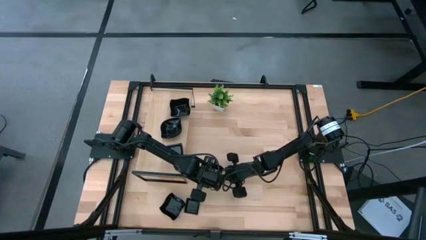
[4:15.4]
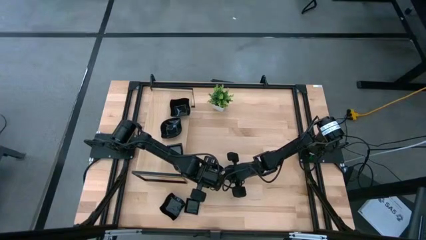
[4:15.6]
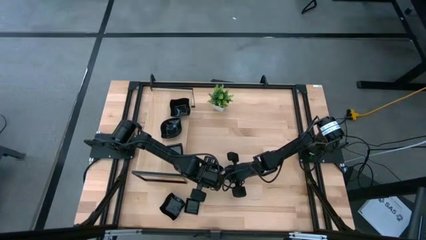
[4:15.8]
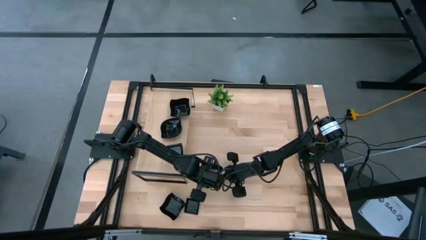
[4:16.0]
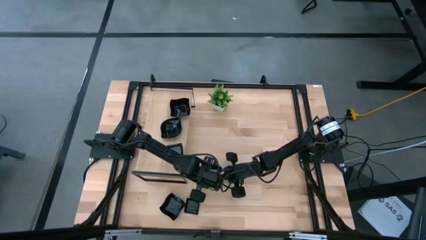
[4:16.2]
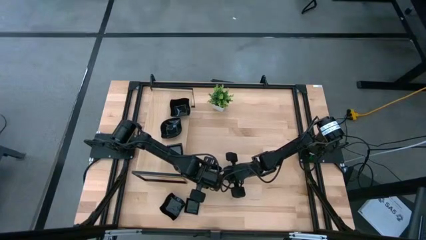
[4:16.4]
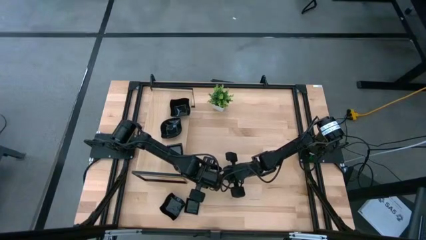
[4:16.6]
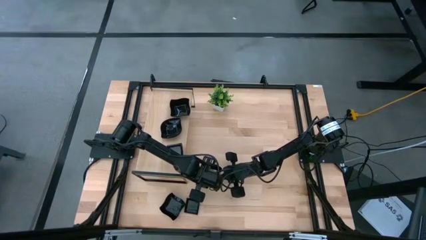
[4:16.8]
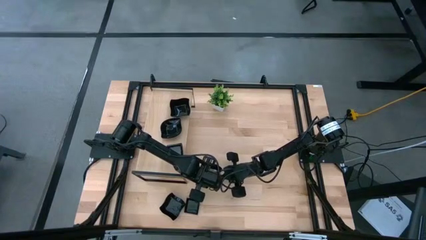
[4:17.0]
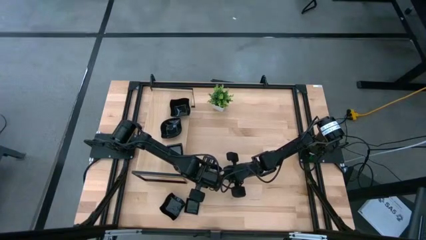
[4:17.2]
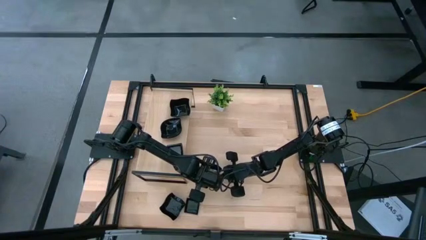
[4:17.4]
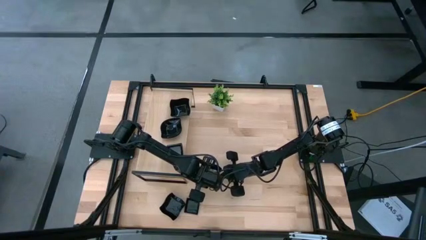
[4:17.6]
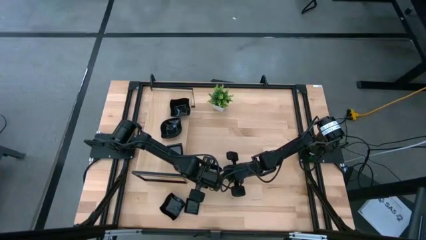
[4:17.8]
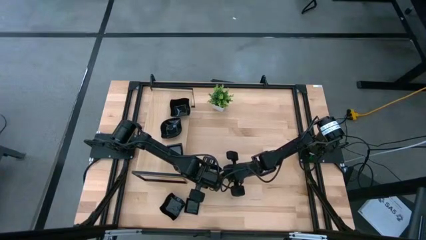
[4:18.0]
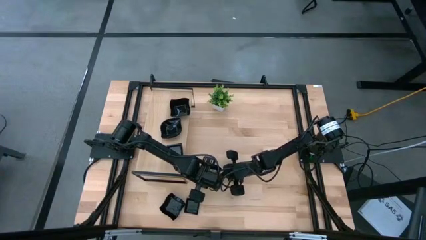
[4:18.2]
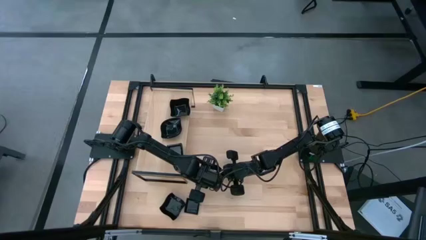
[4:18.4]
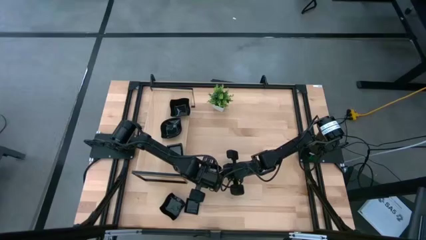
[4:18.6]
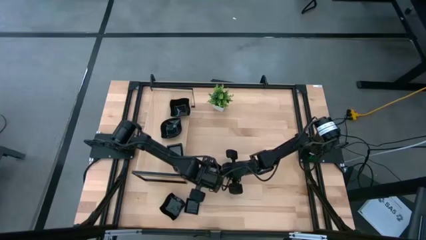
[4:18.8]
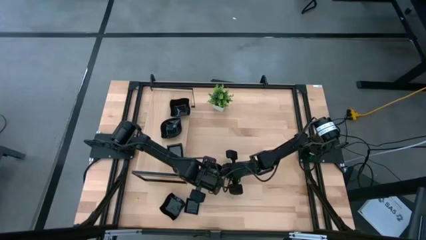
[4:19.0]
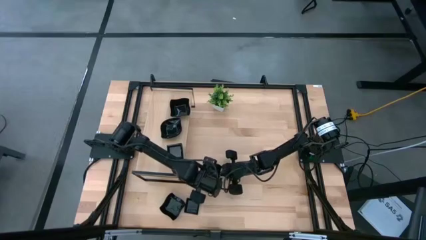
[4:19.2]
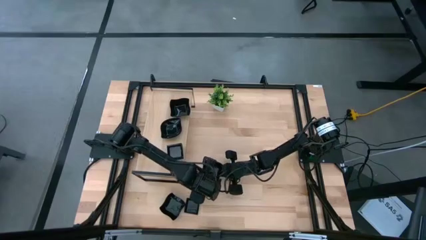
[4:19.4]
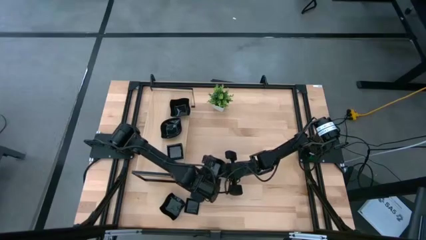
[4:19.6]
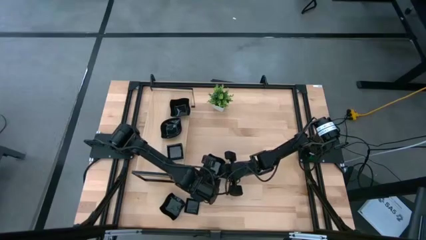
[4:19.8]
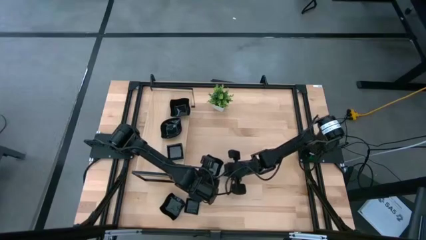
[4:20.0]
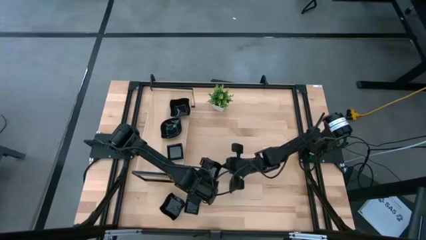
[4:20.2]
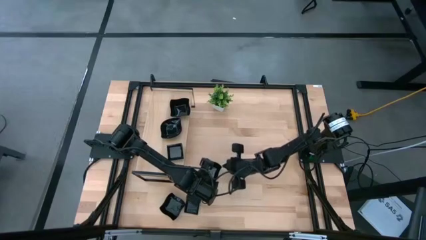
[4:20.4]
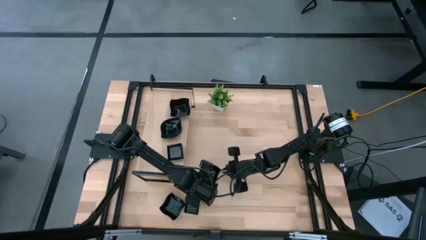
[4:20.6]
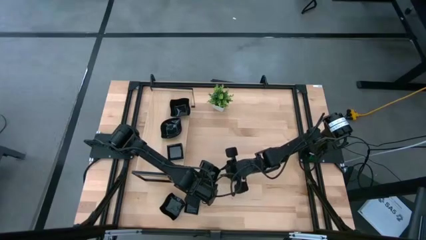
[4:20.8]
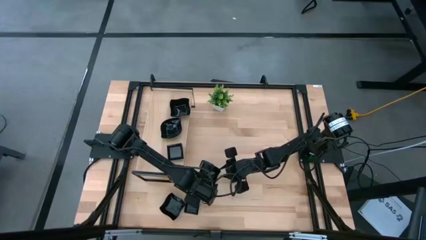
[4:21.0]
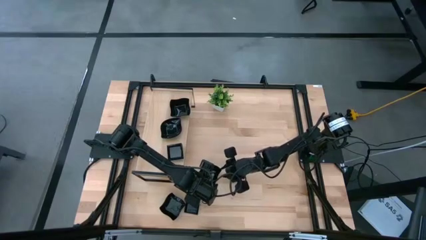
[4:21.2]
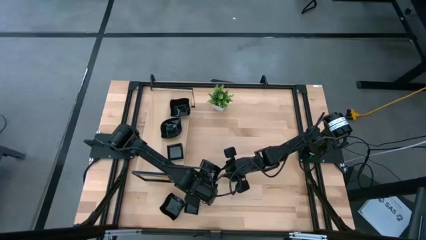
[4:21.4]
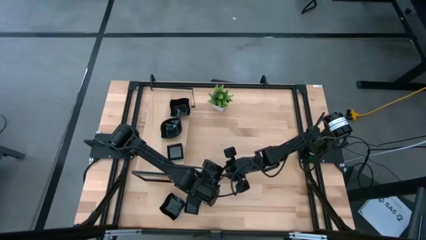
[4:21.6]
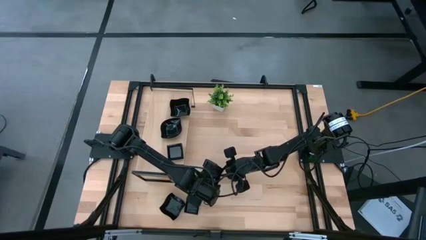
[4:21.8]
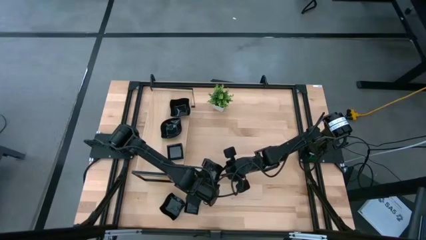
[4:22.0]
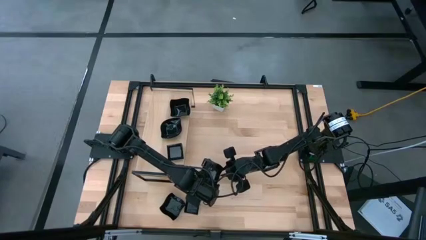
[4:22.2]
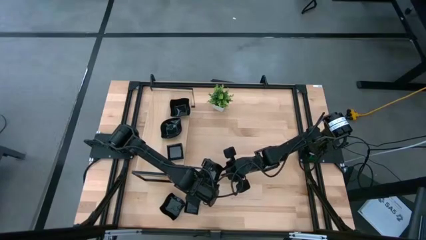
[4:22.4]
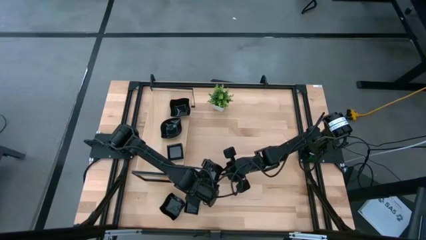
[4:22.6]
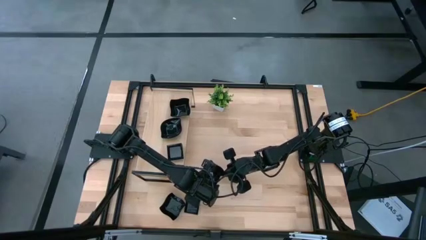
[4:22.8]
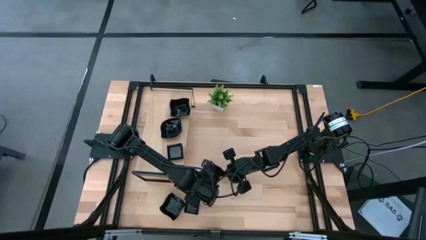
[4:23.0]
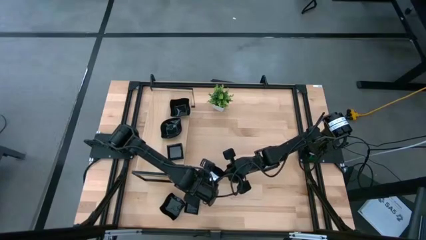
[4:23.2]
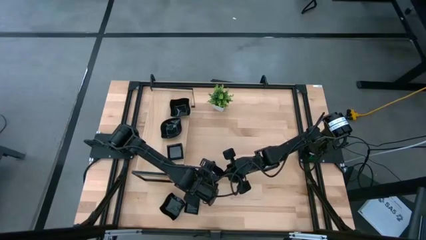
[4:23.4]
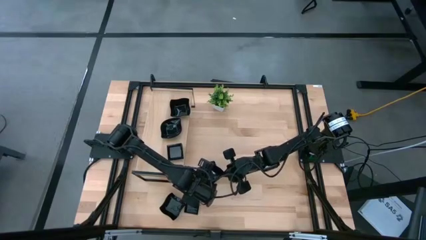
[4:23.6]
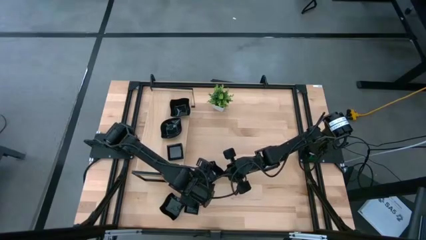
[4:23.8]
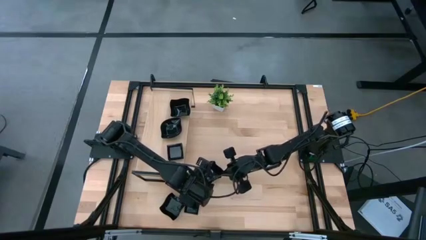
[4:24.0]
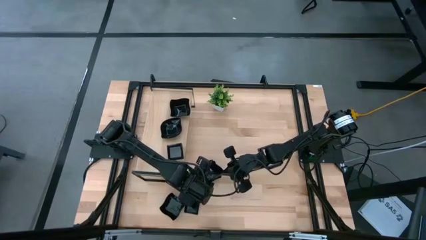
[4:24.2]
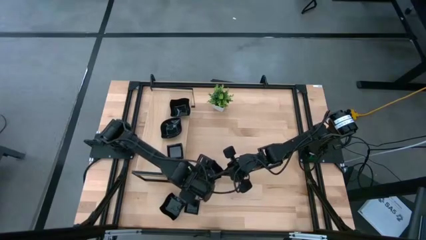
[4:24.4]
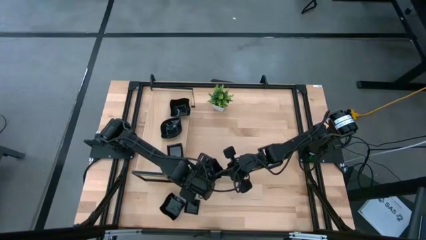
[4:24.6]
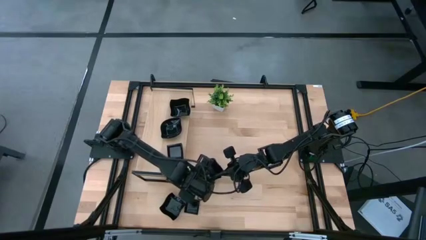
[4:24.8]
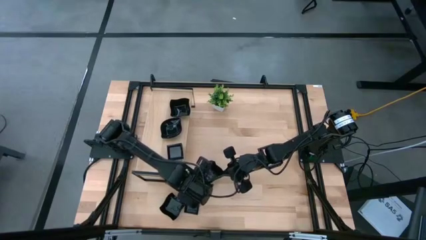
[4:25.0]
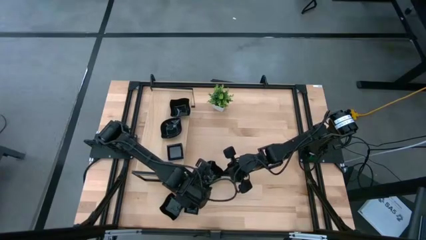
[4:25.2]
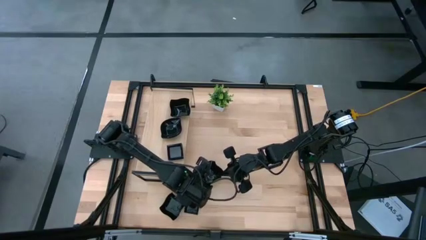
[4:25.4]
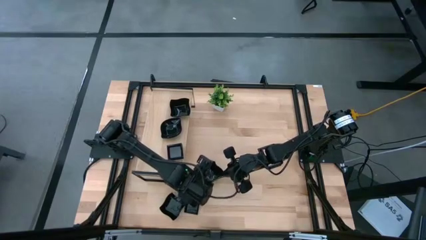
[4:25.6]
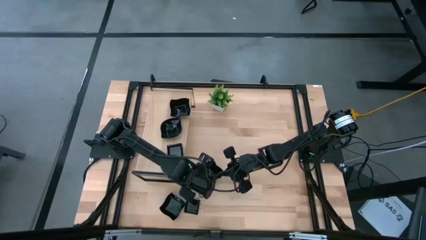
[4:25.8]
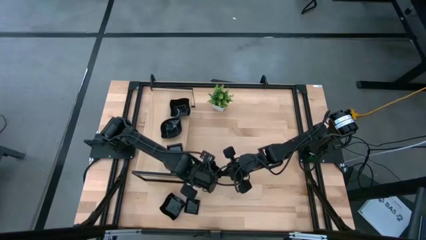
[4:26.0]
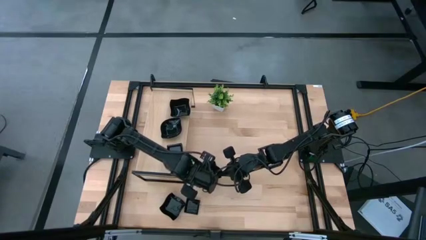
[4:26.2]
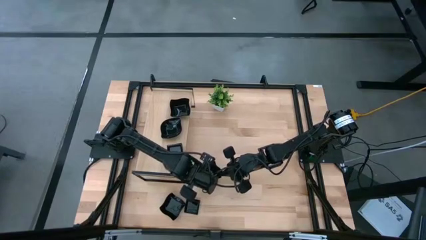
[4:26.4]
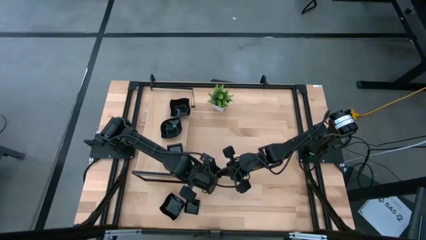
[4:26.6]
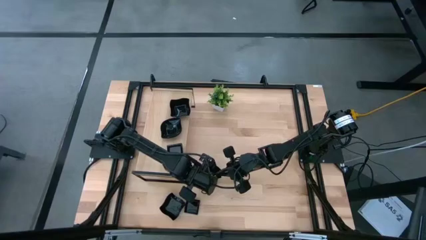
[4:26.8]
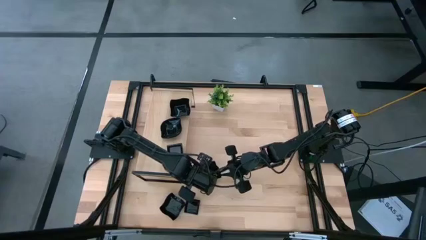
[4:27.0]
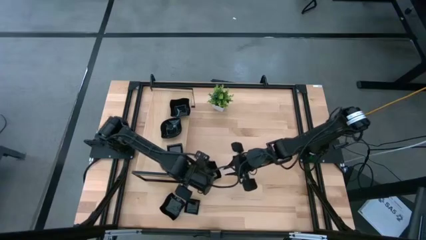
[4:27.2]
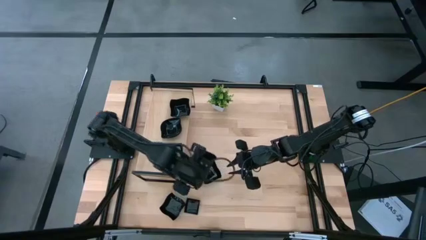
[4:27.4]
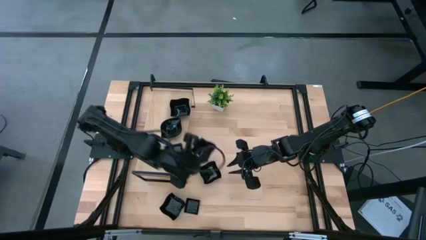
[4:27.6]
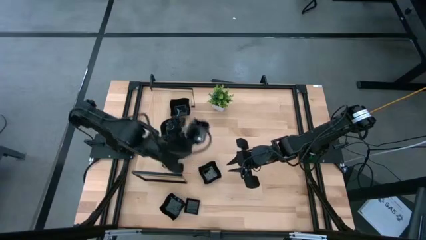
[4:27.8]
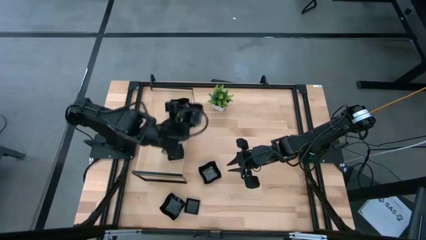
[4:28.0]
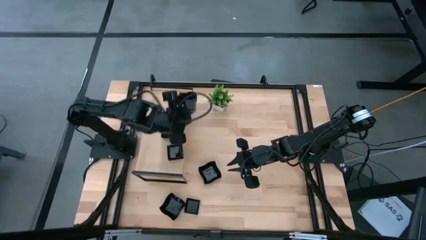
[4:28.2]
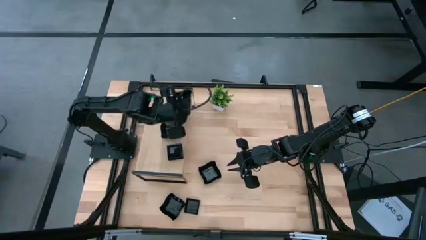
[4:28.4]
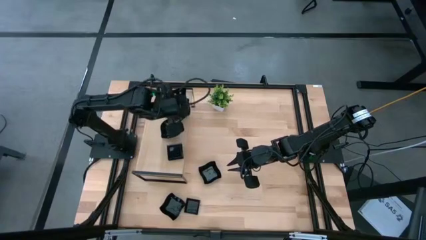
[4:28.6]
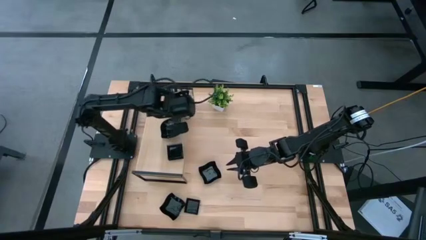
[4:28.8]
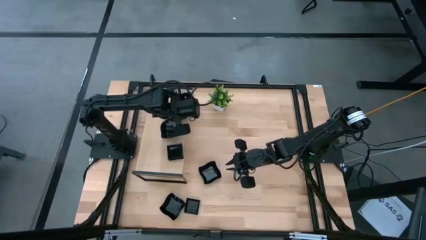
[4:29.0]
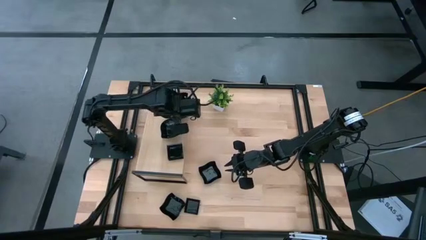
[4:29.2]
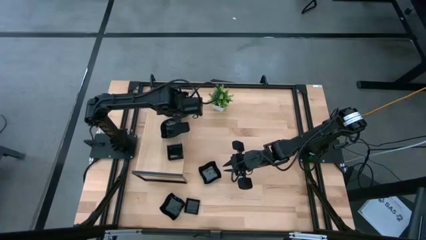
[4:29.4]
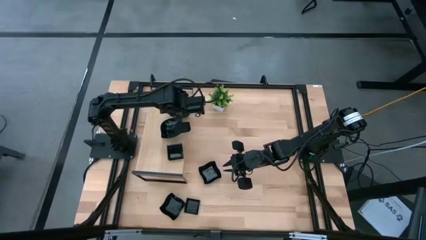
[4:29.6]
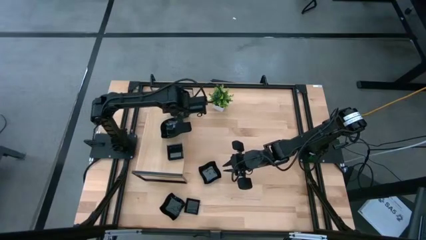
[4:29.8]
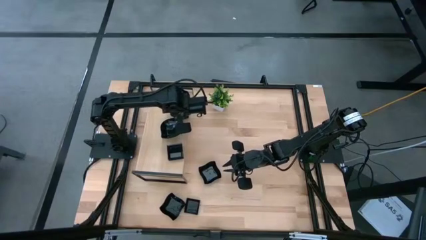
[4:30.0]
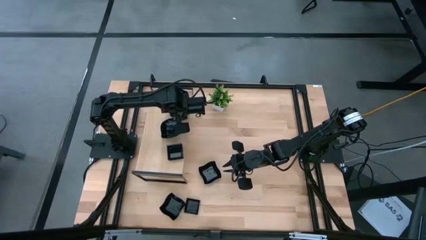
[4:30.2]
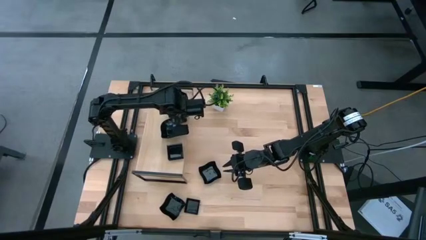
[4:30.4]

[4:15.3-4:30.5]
Task: Pick & Place Mini shaped plates
Stack the black distorted square plate on top of the black distorted square plate on the shelf

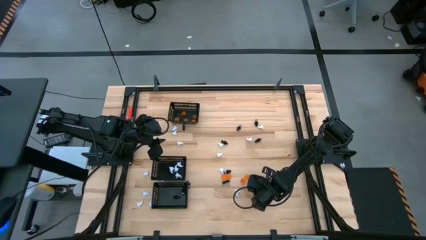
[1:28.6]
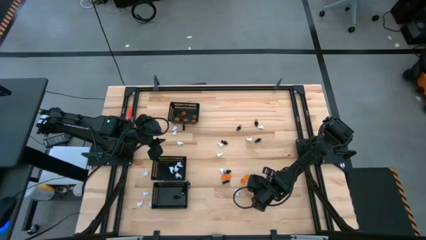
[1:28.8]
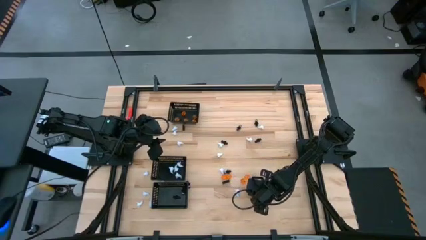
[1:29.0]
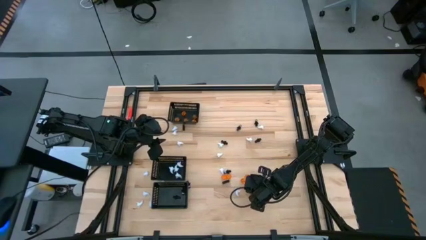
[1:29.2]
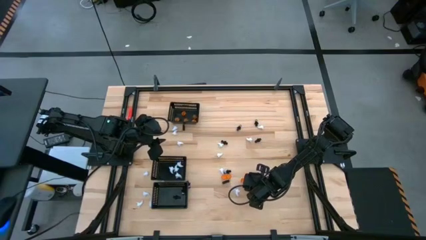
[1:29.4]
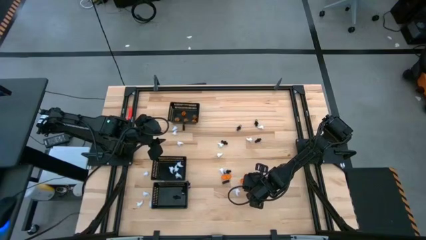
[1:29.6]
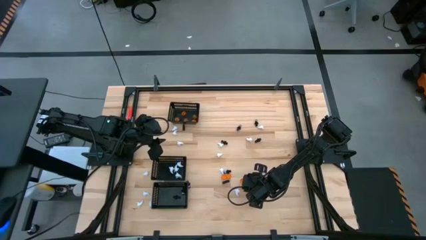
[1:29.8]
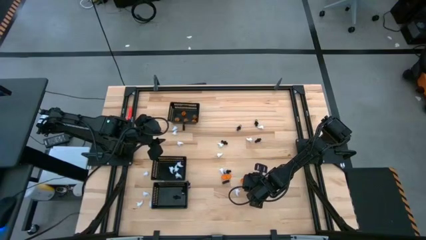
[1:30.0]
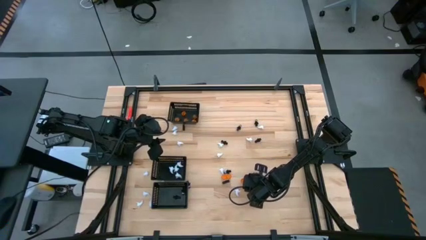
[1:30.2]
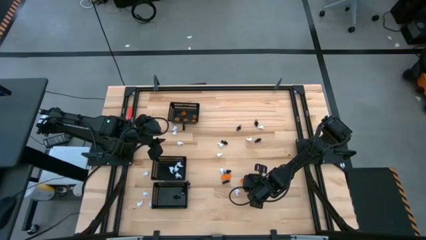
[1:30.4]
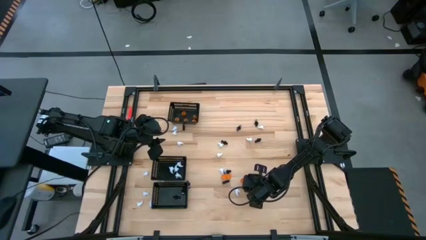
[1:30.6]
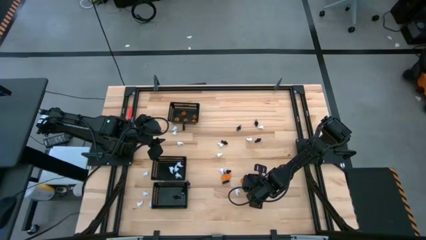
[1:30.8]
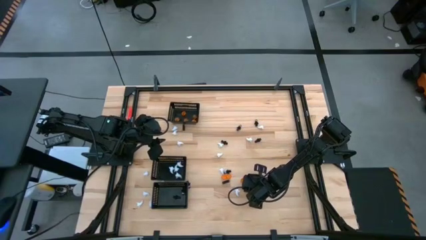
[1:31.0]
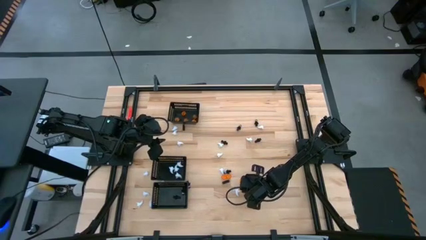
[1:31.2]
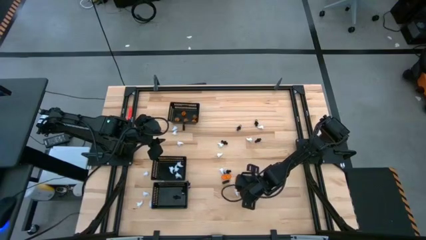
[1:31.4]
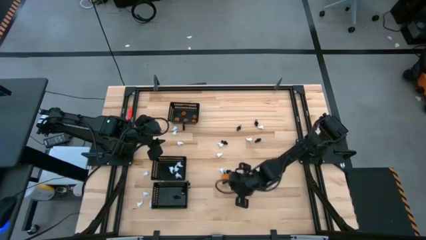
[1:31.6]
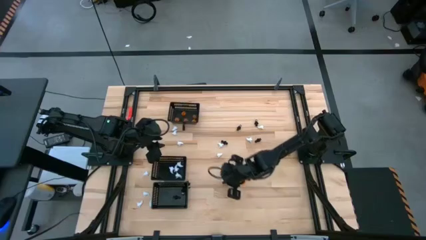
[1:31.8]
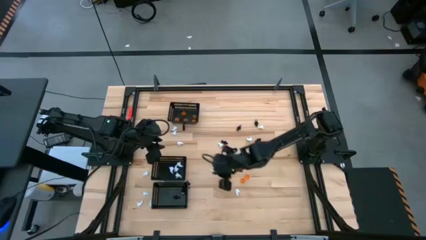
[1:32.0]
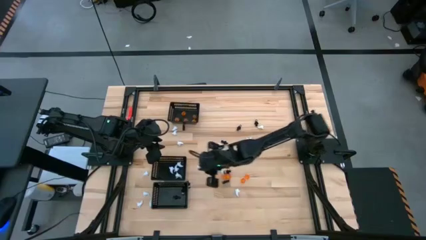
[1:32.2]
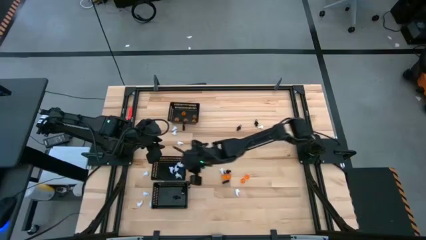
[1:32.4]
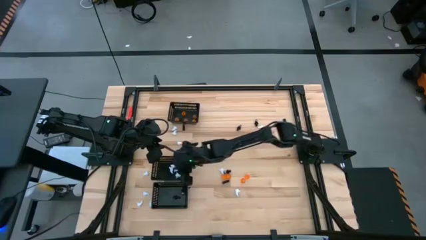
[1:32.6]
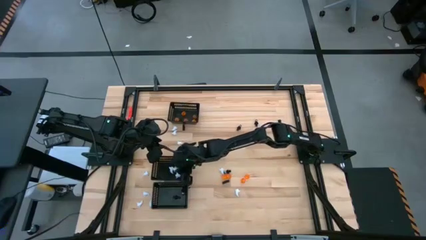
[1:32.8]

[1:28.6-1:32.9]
Task: Sort Halloween decoration
Put the white toy into the middle black bin
